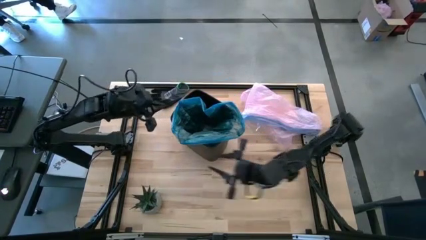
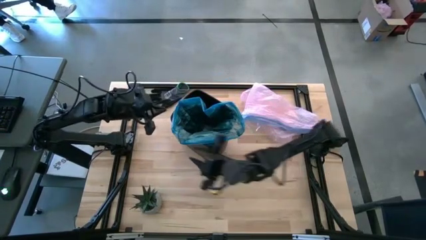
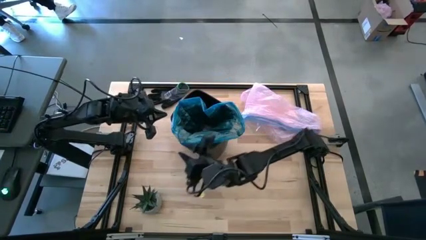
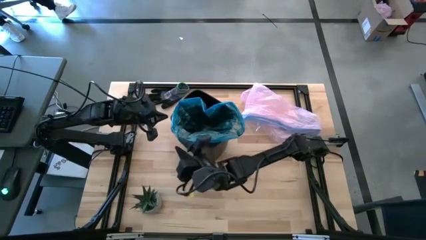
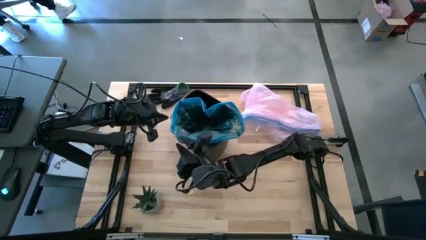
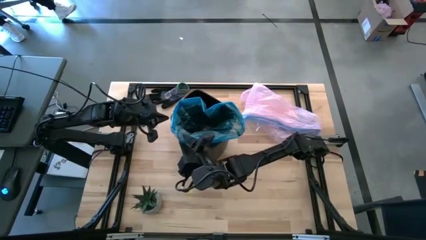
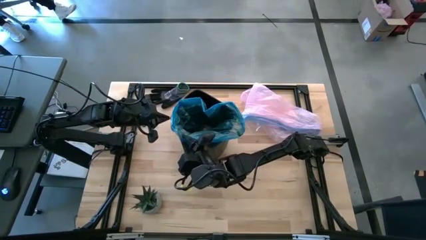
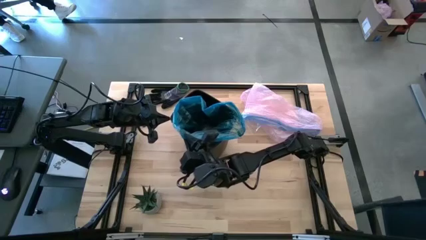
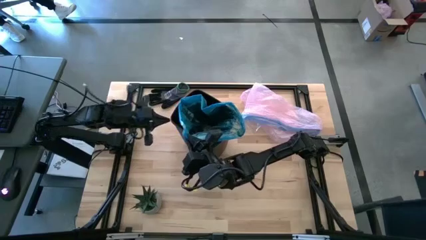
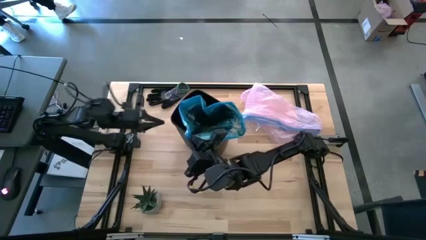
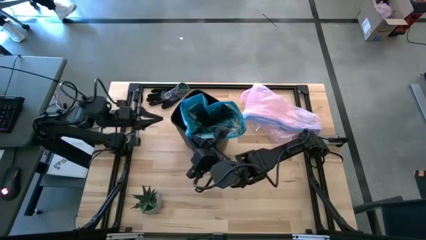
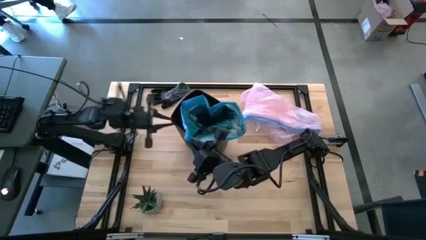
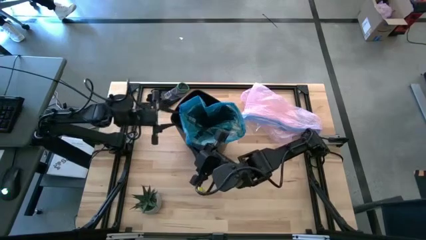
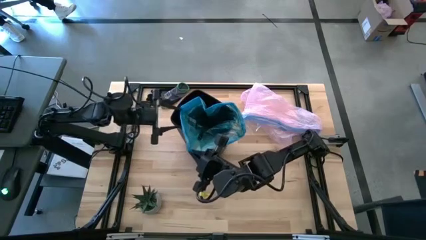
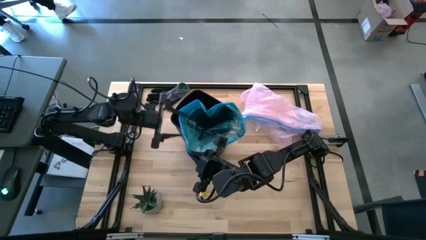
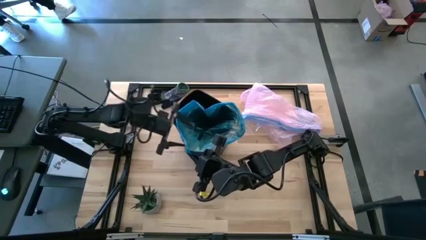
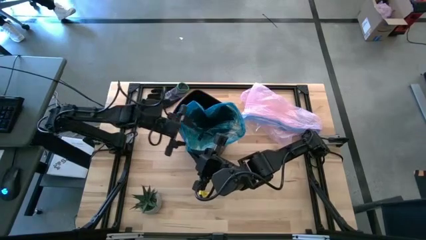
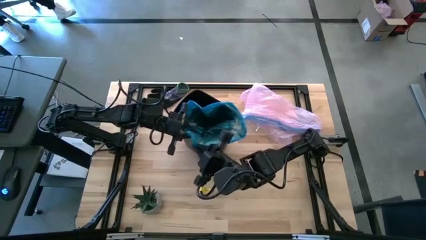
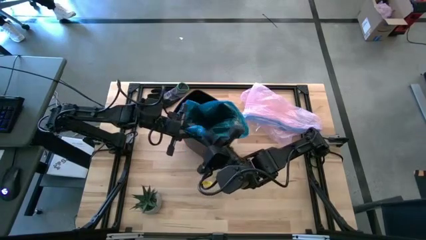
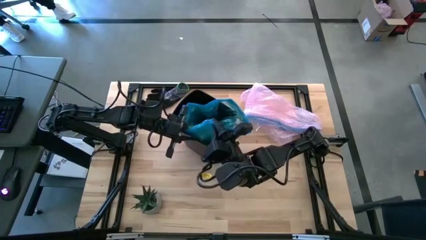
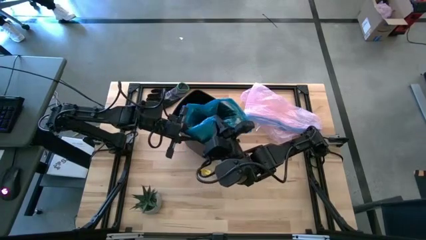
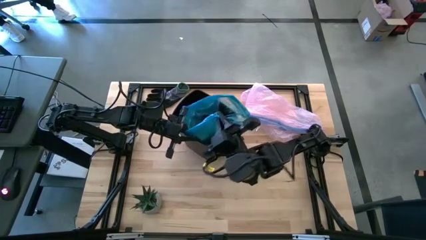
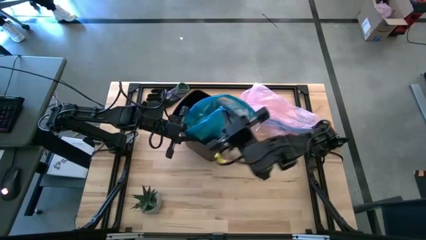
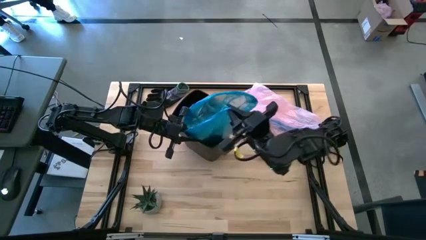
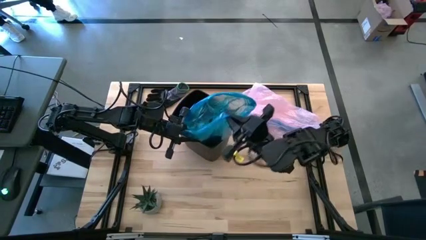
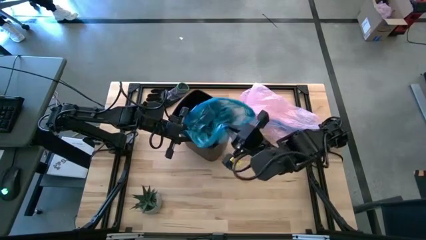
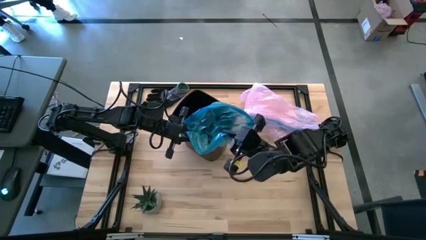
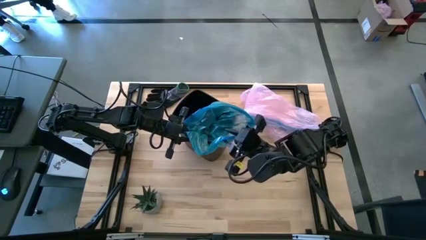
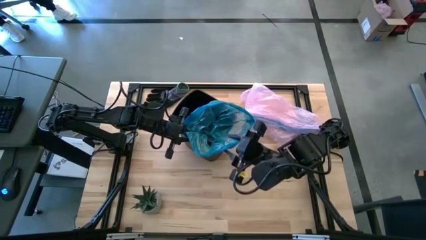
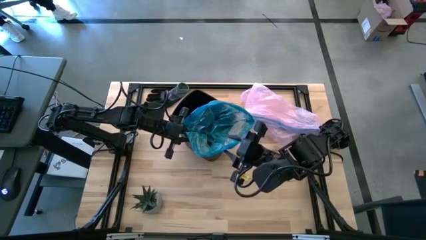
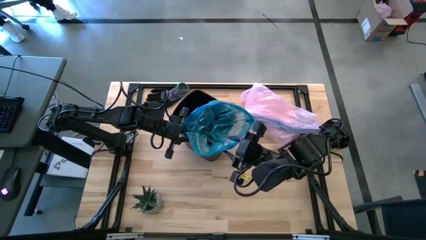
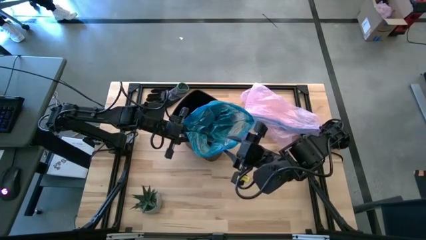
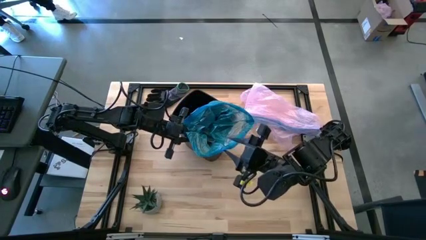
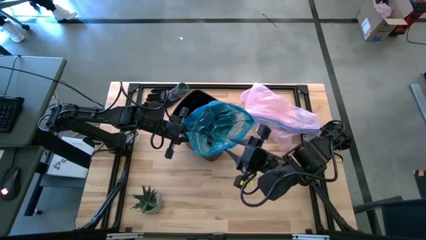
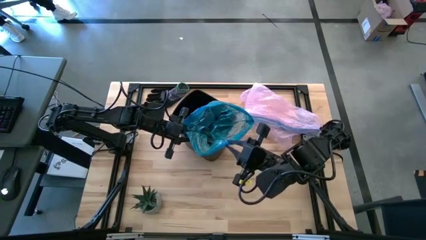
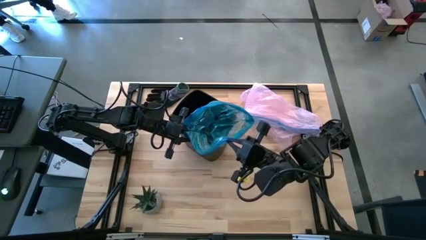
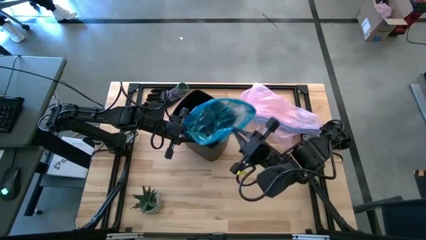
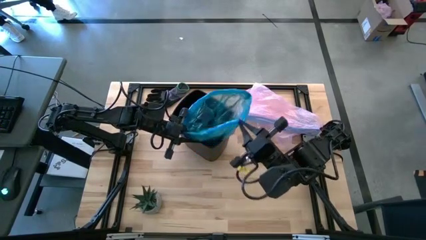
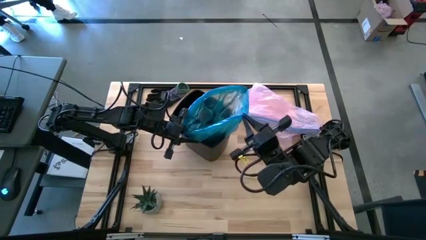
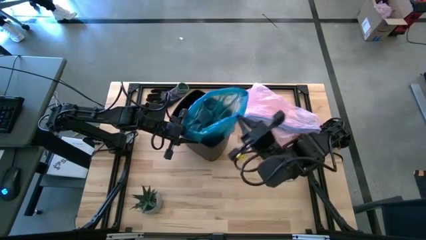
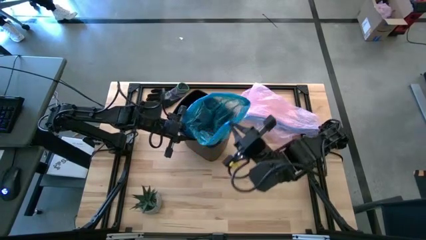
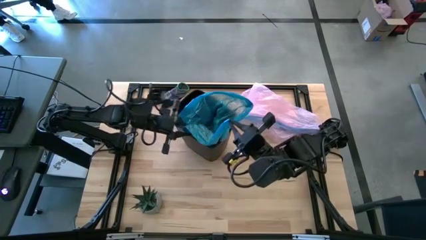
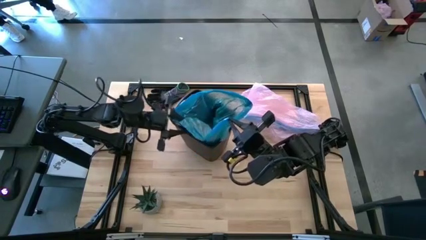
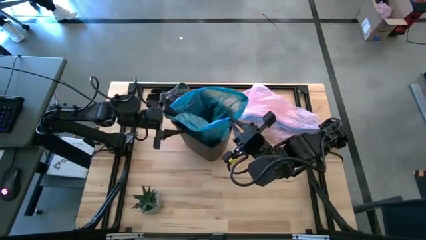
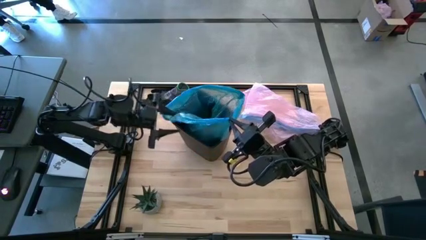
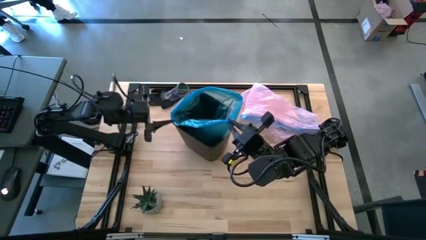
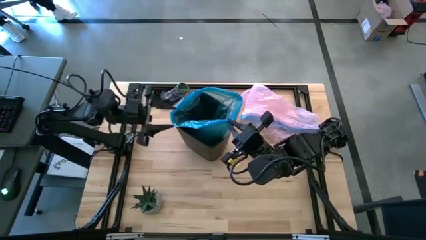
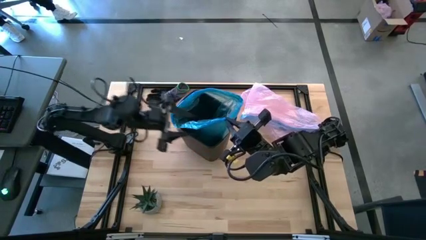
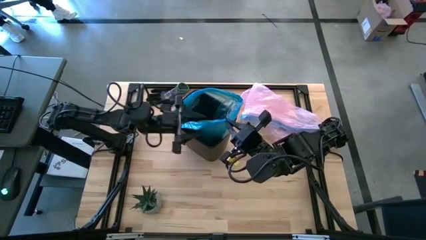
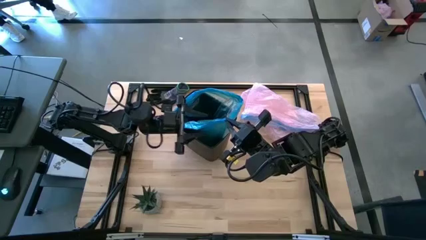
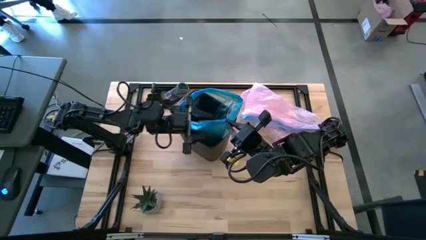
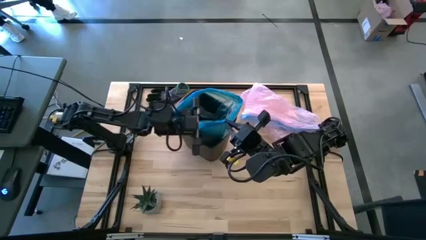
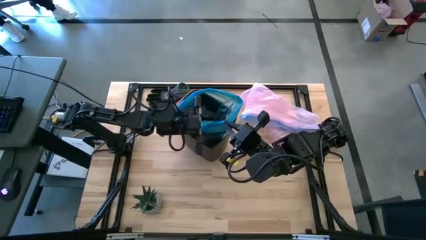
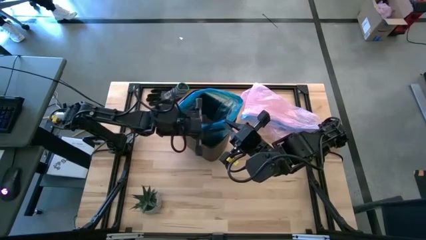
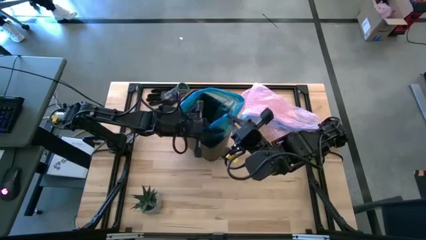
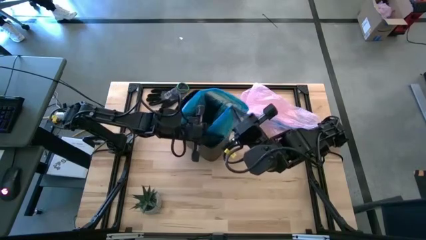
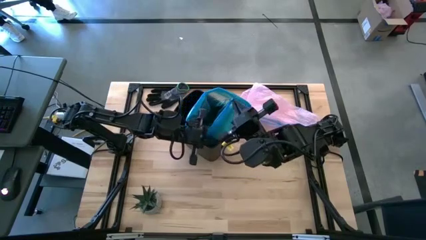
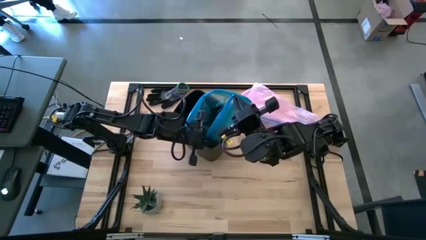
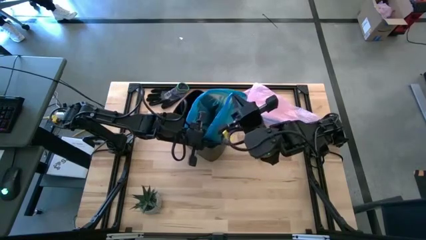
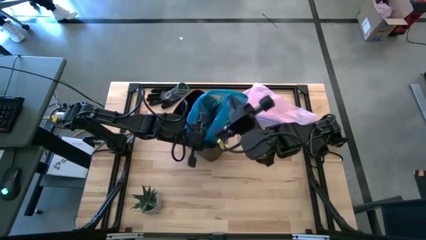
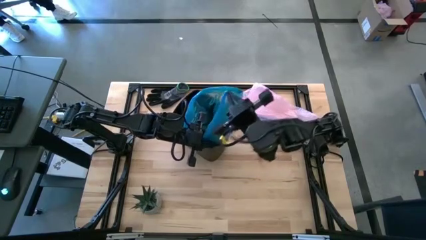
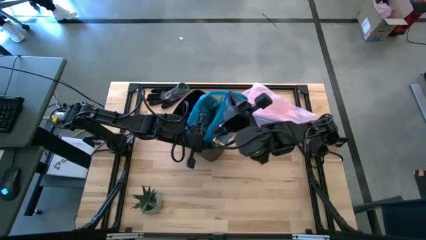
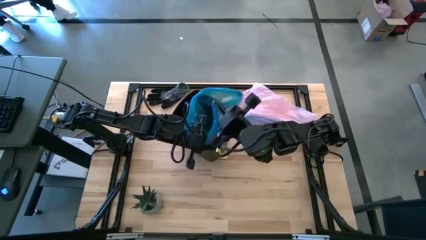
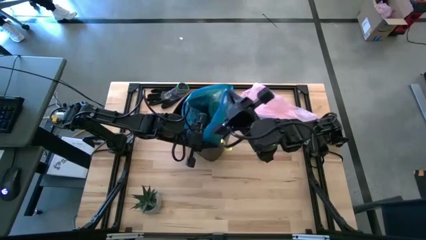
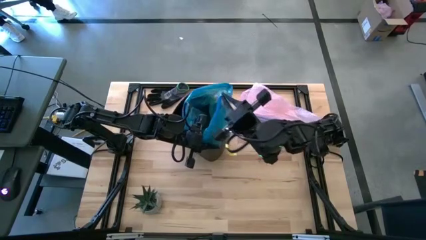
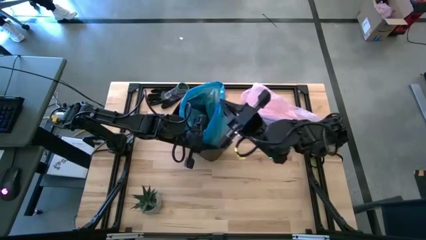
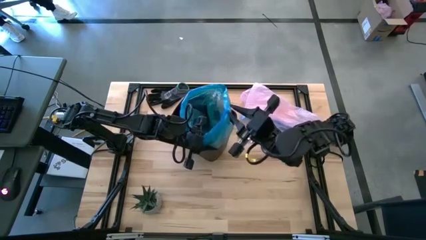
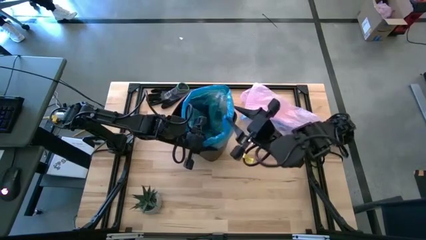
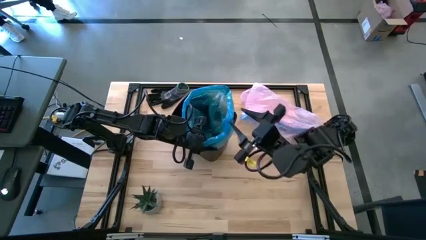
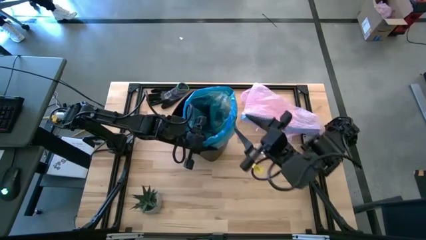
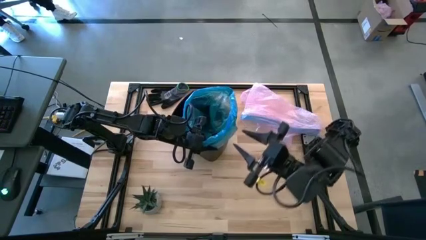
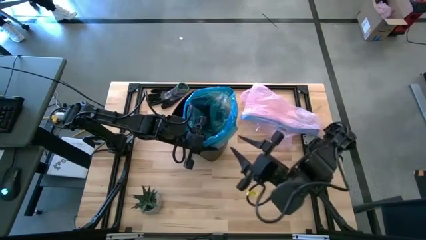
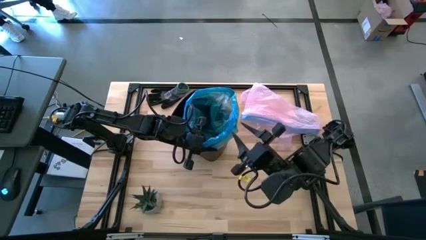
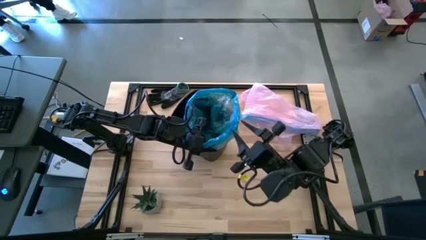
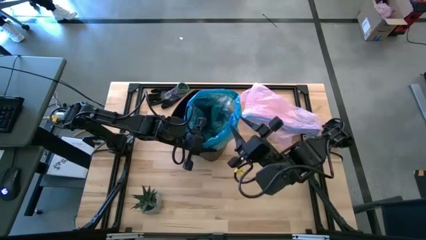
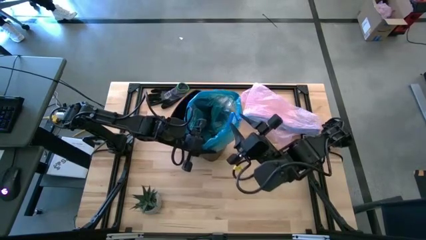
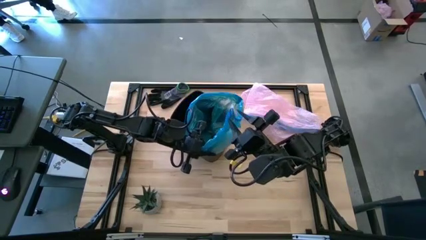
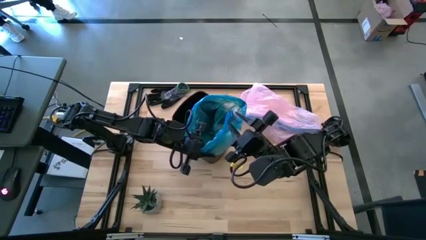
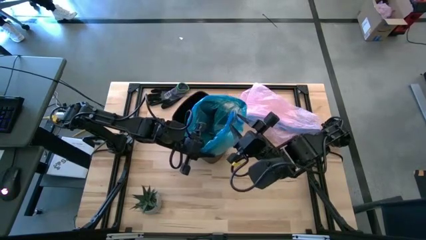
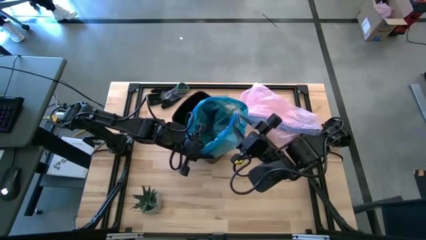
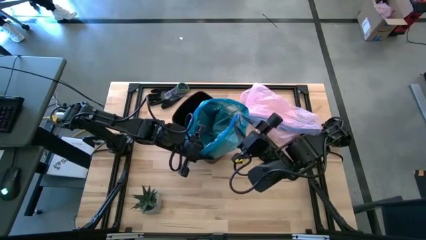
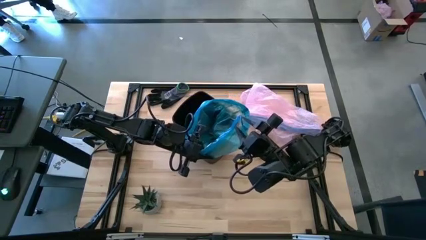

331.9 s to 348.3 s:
Task: place trash/remove bag and relplace
Remove the blue trash bag from the trash bin
